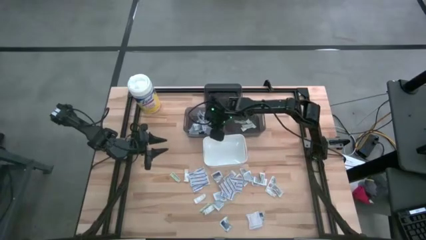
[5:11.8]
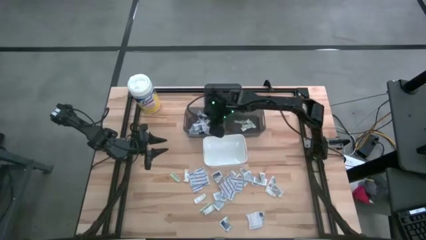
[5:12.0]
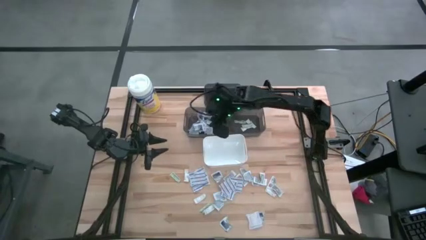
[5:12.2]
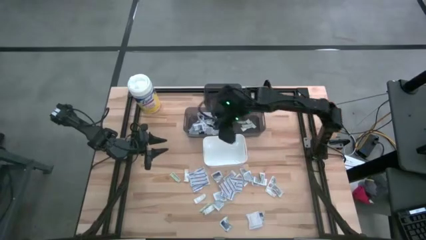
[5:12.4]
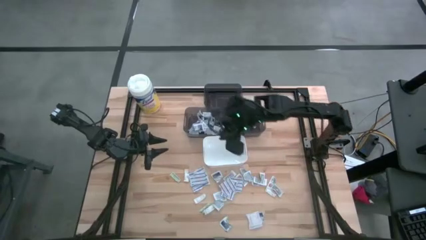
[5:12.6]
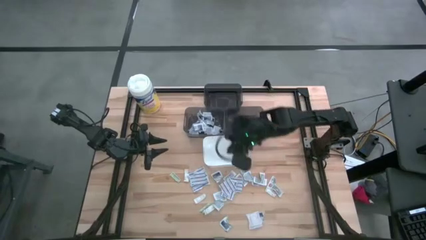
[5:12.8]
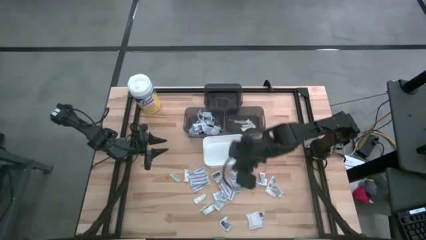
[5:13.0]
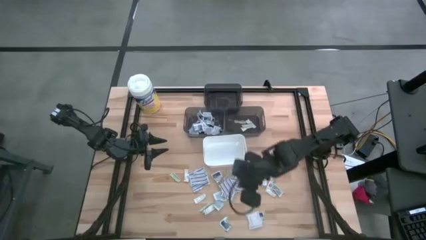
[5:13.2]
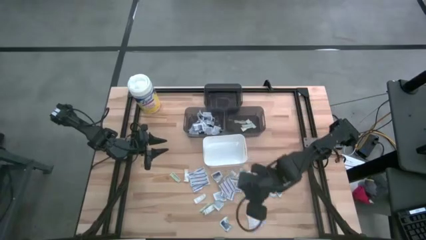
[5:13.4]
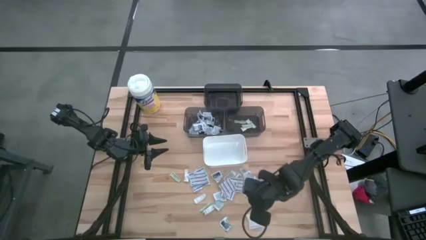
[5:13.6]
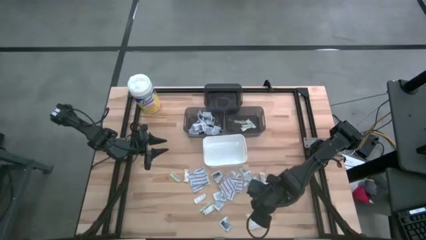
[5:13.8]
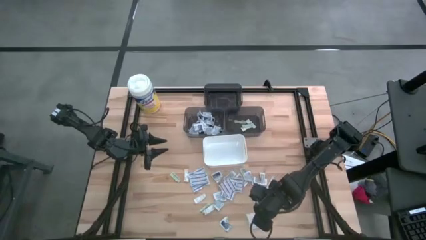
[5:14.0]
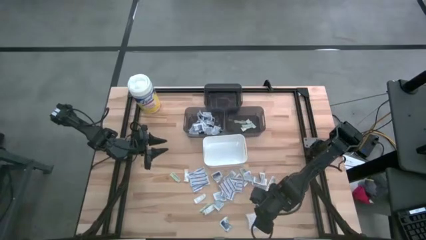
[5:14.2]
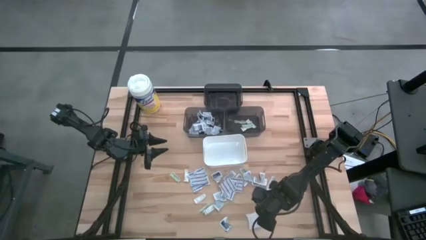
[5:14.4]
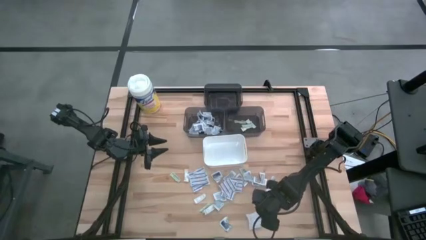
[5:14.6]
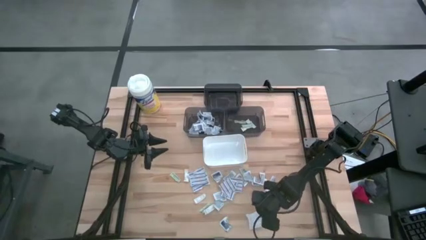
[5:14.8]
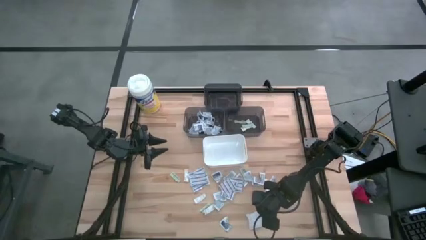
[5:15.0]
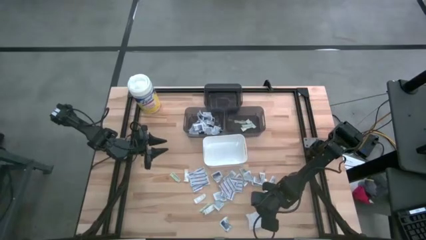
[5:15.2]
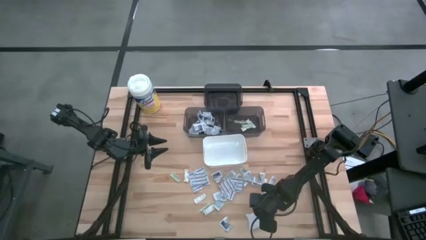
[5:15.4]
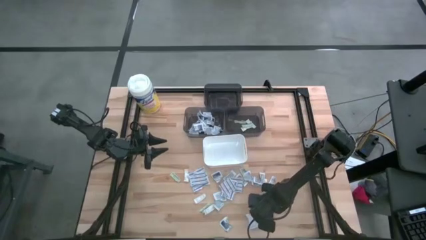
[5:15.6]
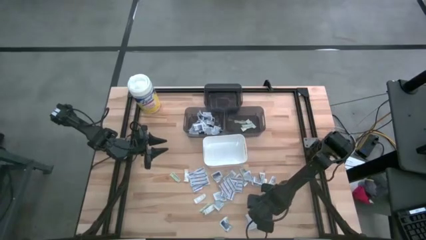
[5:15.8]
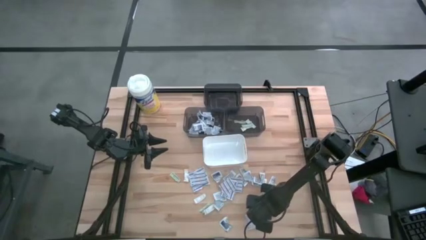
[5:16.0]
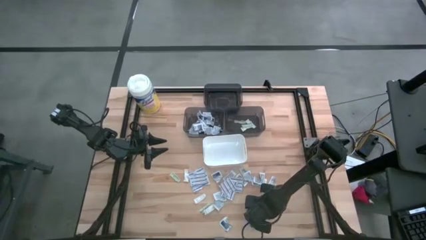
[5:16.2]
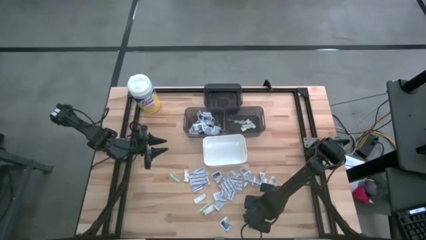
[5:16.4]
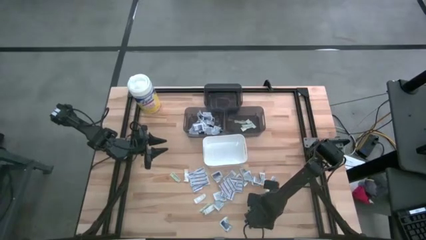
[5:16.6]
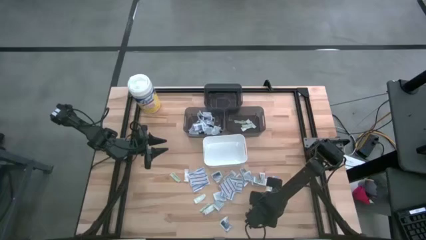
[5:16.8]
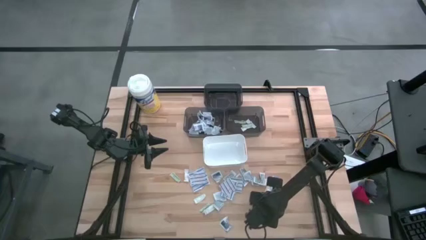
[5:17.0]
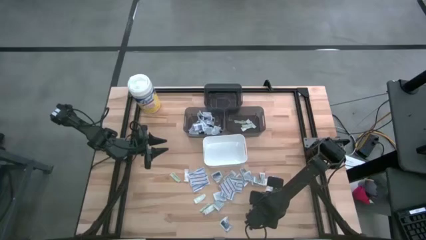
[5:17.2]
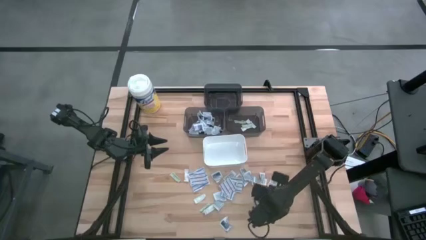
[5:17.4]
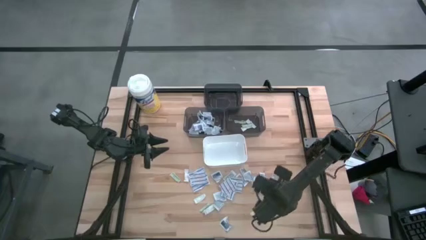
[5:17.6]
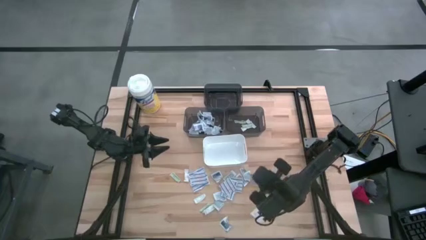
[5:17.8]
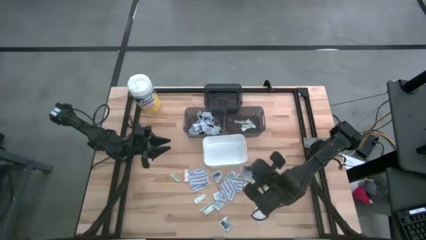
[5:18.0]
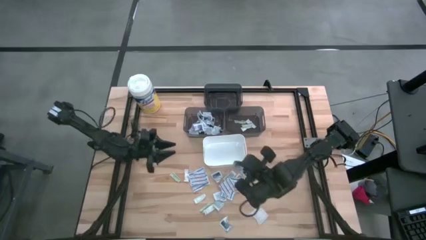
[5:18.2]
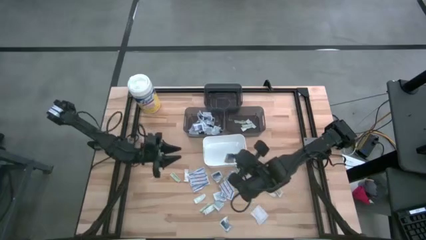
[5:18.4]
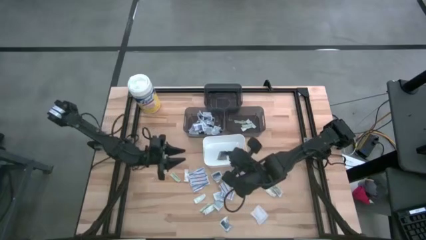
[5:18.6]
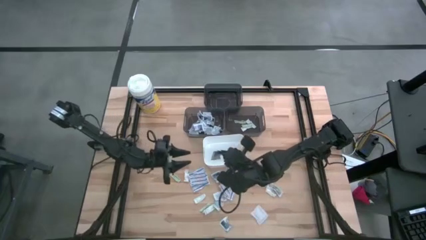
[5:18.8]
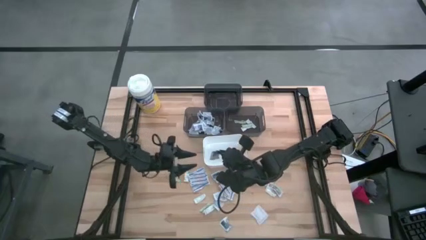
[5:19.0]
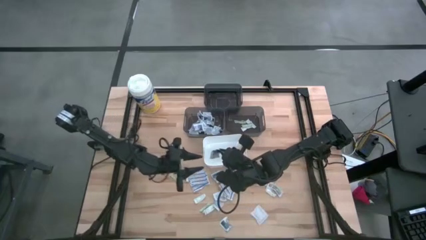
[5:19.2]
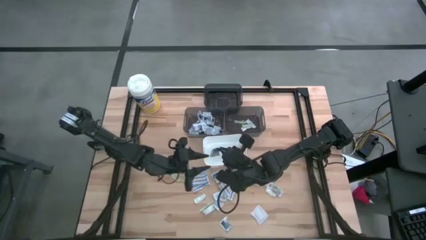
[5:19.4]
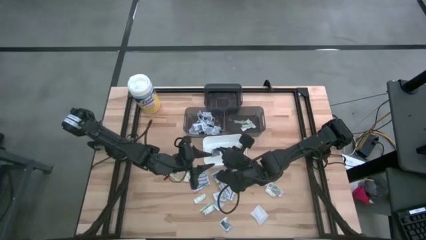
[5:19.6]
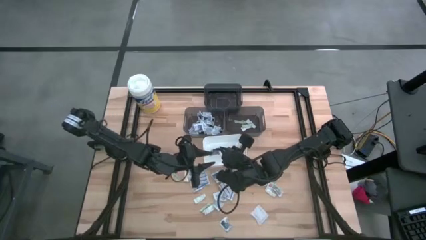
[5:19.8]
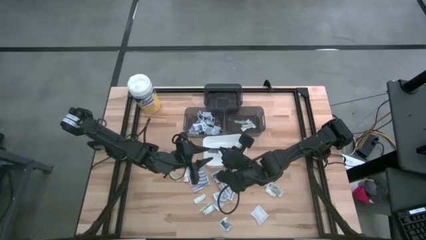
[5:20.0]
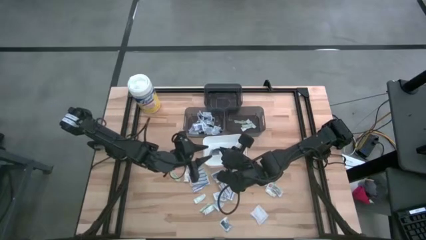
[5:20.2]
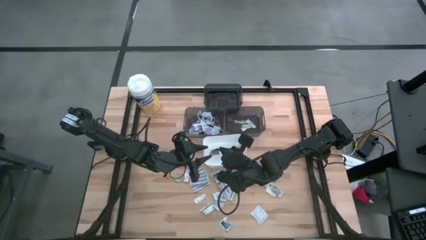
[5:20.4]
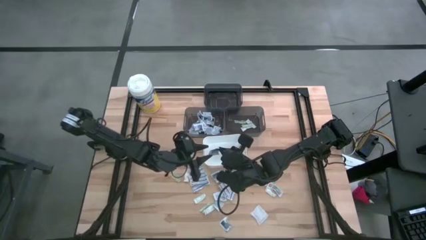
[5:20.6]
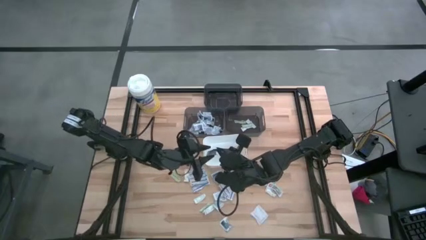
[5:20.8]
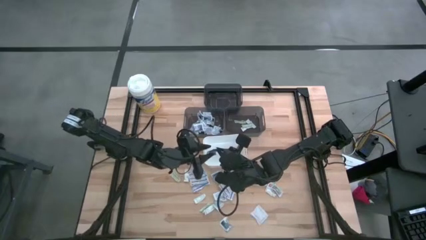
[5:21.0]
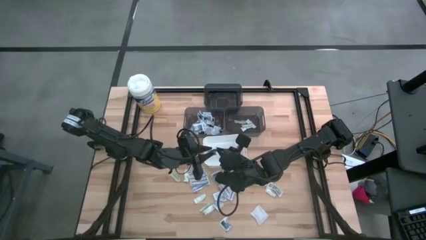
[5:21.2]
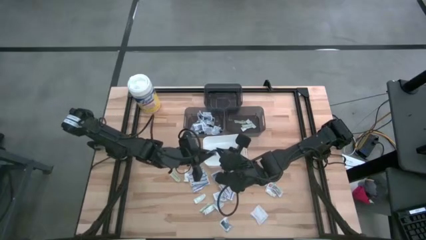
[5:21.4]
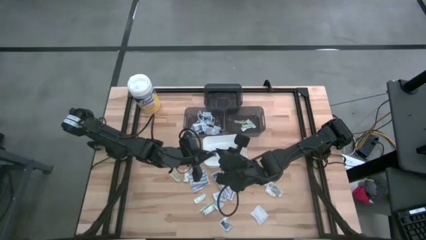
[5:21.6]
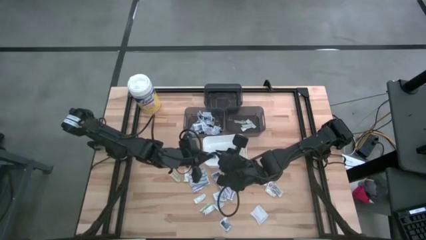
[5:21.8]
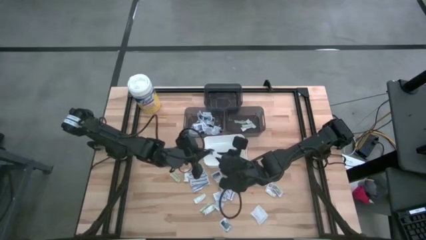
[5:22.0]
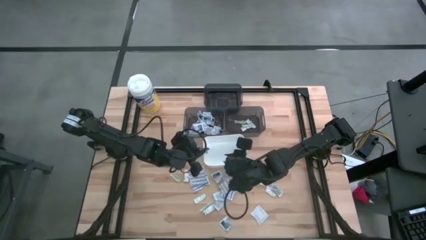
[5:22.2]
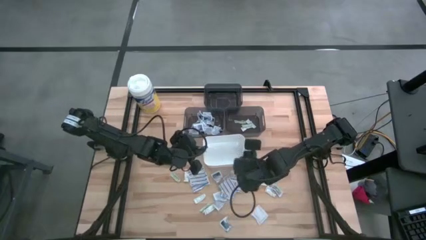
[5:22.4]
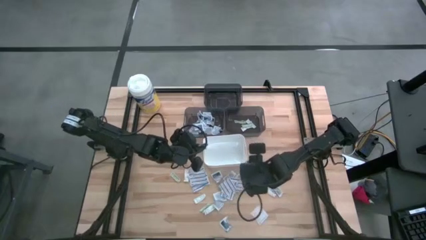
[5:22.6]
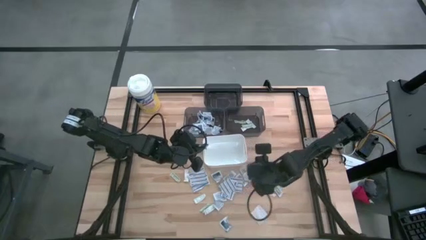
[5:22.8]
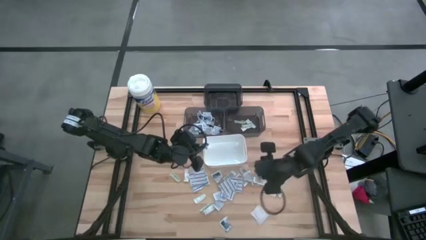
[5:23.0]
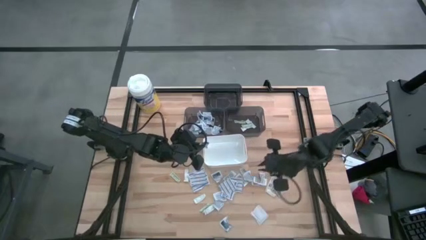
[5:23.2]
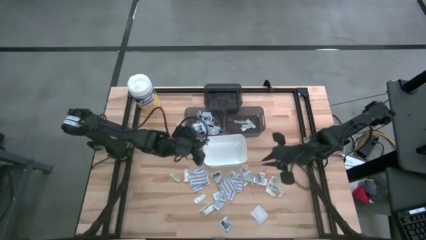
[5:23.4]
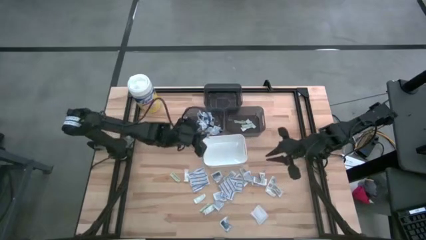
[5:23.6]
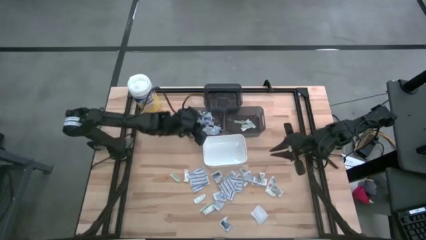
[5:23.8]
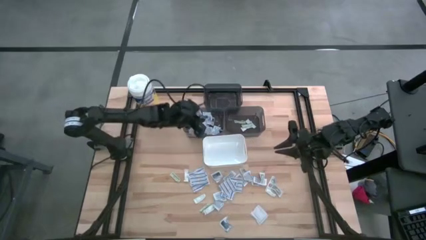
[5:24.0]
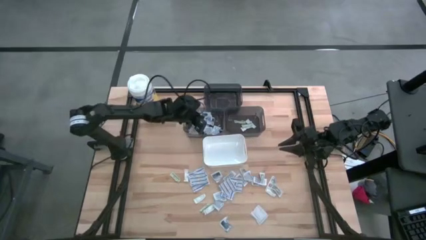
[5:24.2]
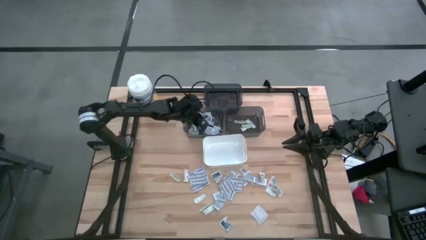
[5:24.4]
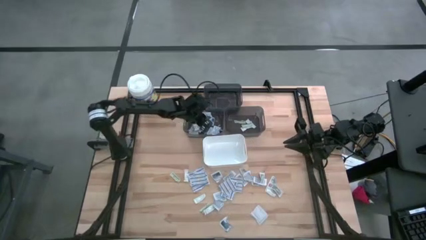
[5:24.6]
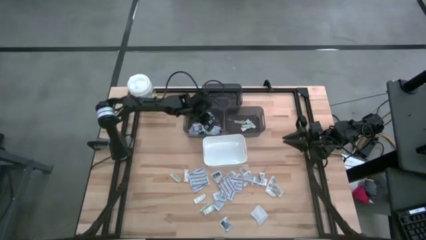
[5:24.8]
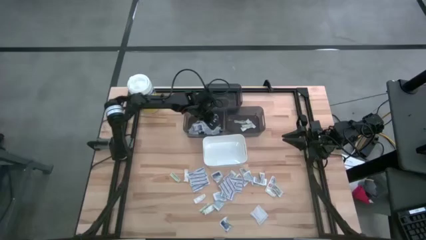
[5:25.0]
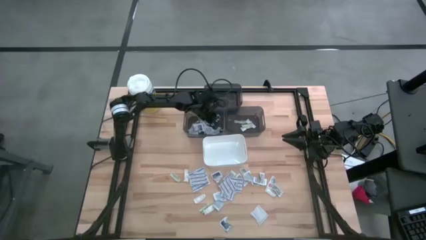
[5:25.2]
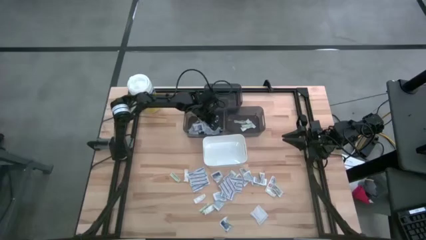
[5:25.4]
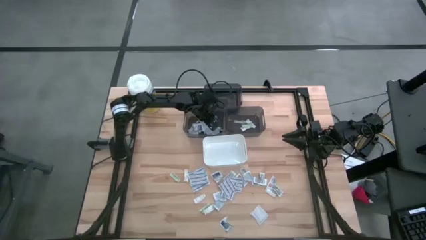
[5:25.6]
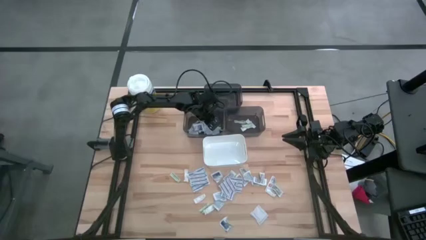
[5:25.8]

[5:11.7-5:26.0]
Task: Pick & Place First Aid Supplies
Put the alcohol pad into the bottom left black bin
